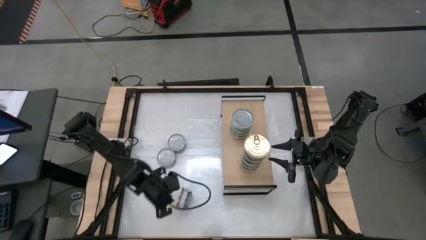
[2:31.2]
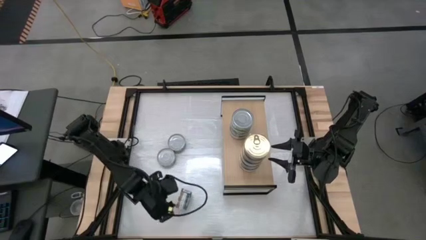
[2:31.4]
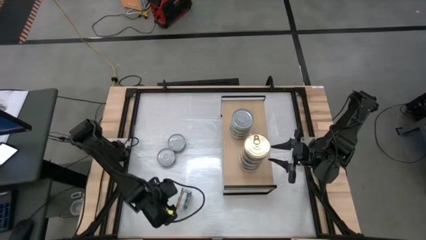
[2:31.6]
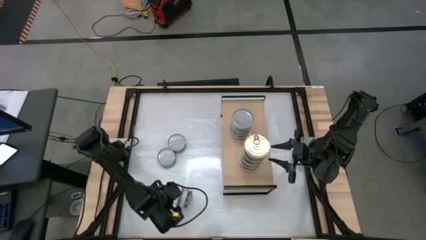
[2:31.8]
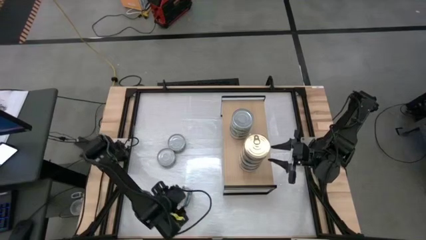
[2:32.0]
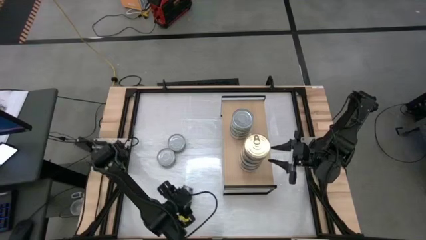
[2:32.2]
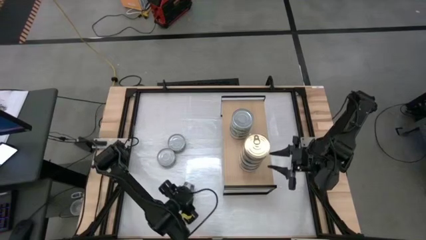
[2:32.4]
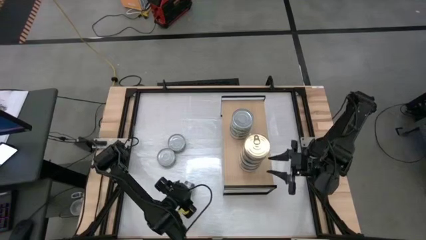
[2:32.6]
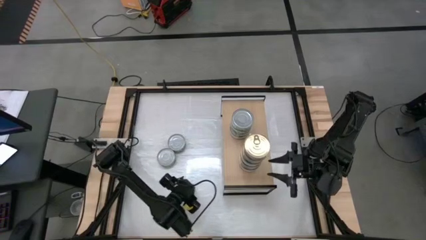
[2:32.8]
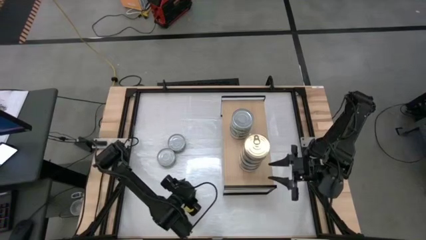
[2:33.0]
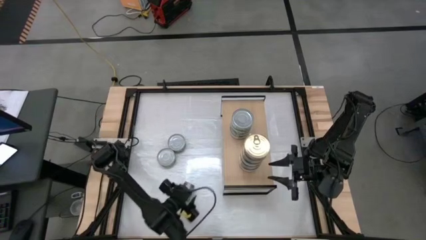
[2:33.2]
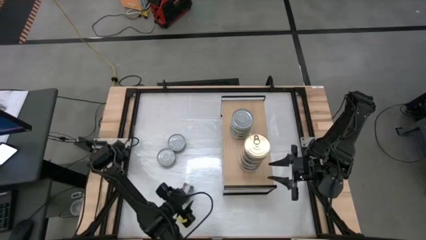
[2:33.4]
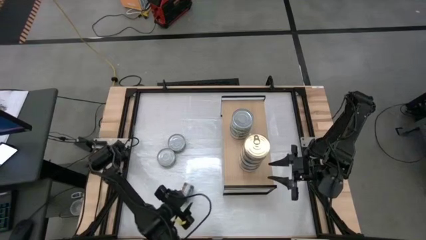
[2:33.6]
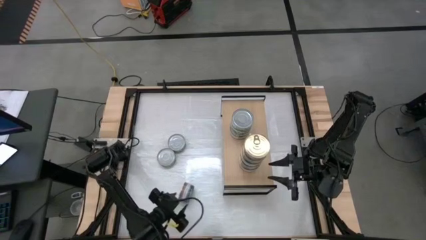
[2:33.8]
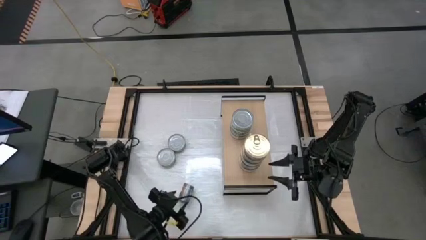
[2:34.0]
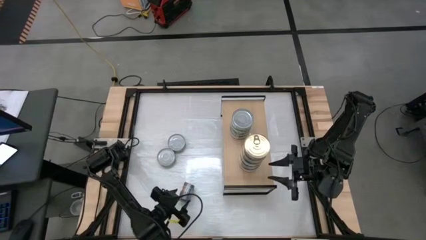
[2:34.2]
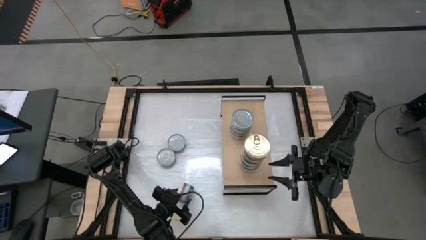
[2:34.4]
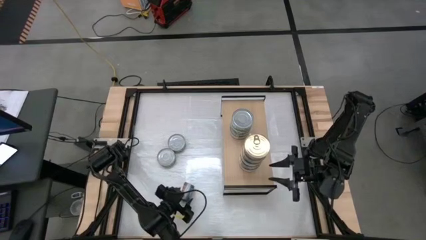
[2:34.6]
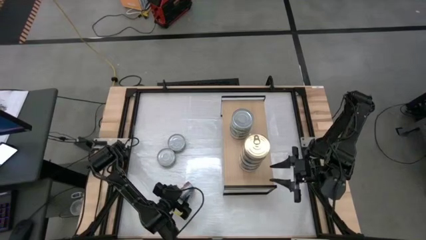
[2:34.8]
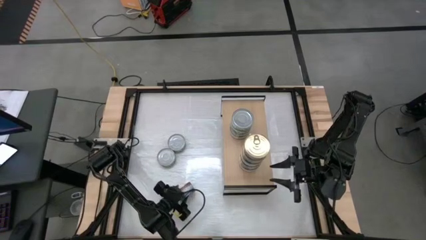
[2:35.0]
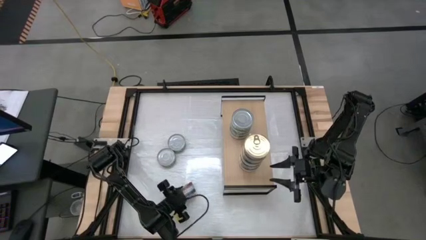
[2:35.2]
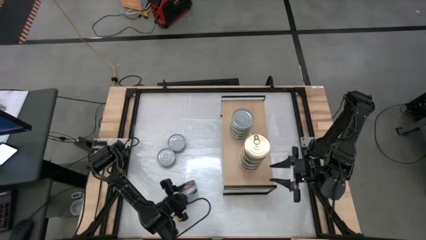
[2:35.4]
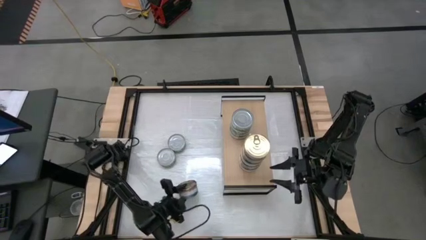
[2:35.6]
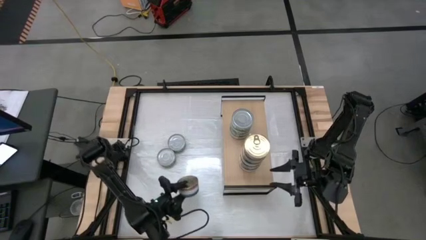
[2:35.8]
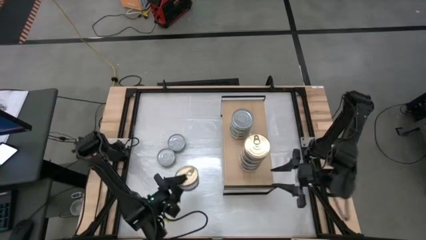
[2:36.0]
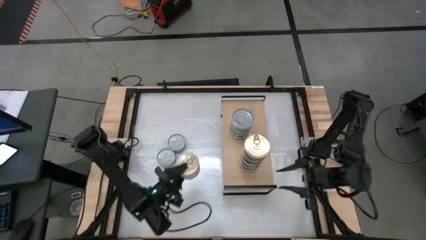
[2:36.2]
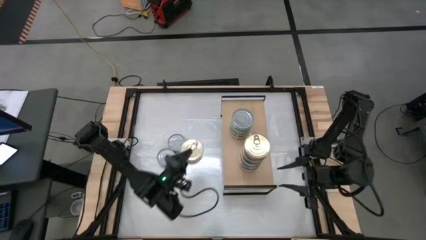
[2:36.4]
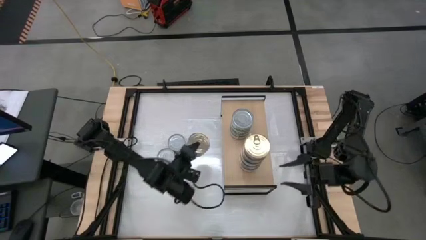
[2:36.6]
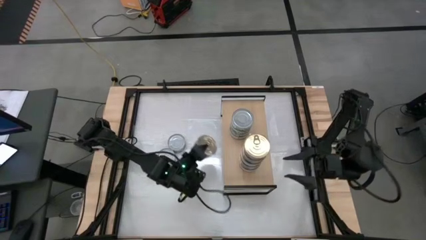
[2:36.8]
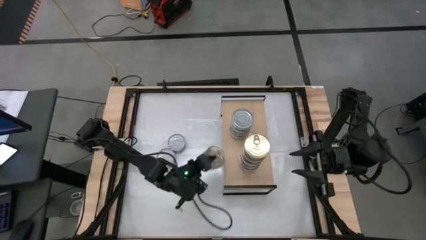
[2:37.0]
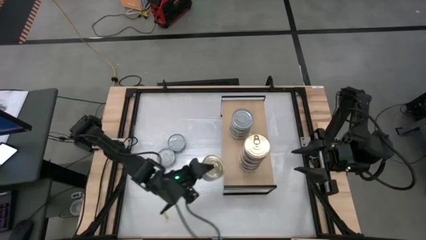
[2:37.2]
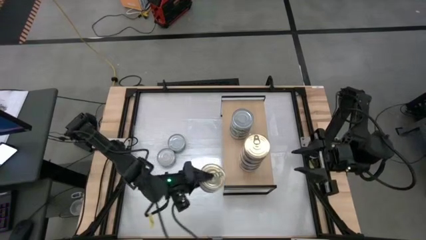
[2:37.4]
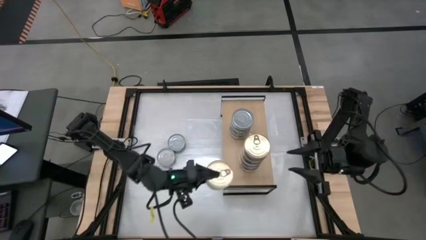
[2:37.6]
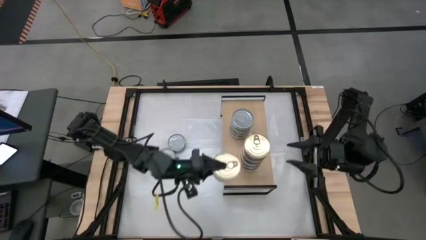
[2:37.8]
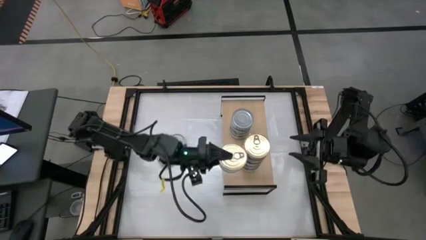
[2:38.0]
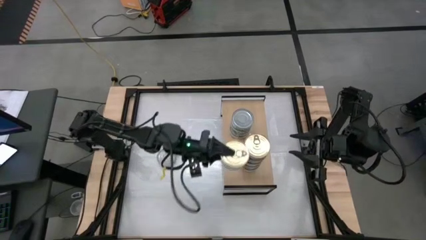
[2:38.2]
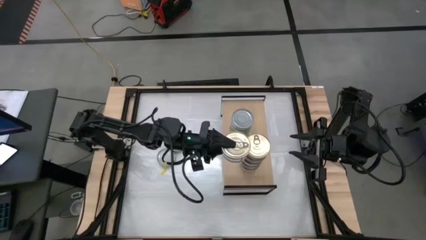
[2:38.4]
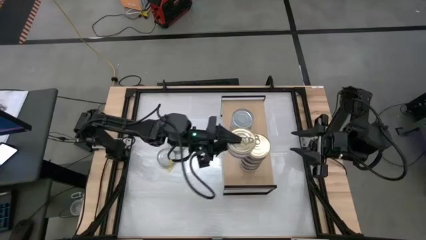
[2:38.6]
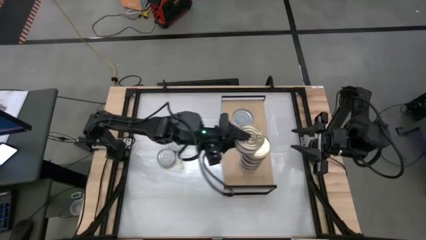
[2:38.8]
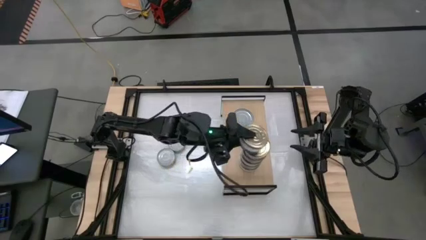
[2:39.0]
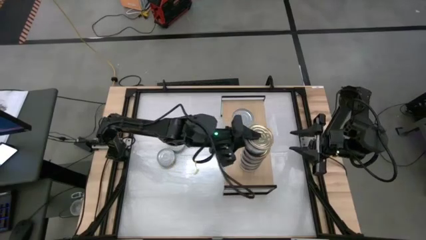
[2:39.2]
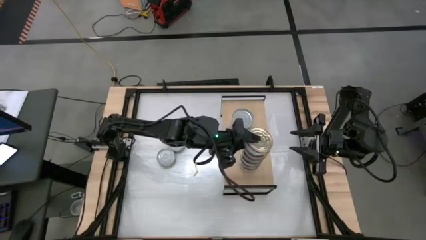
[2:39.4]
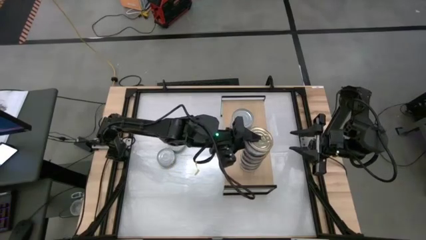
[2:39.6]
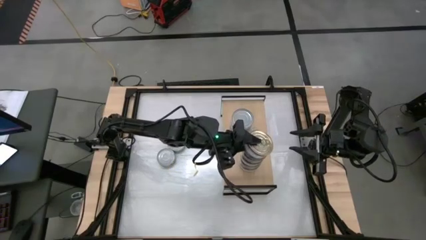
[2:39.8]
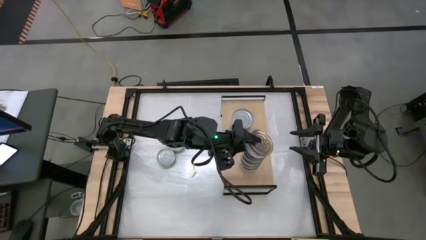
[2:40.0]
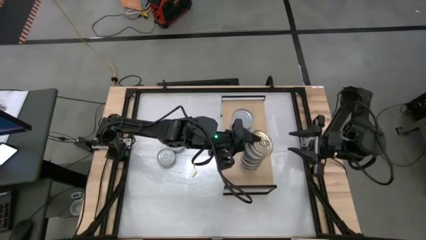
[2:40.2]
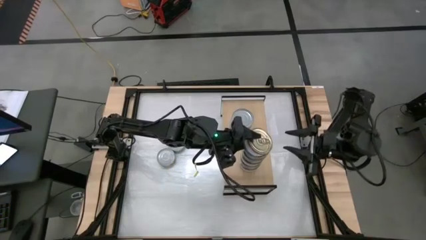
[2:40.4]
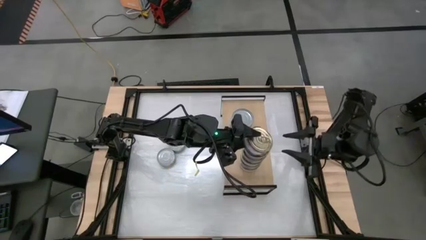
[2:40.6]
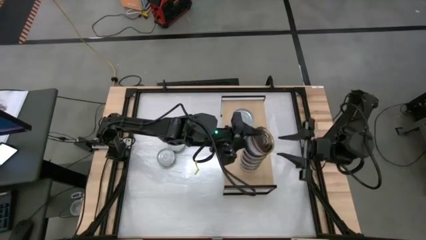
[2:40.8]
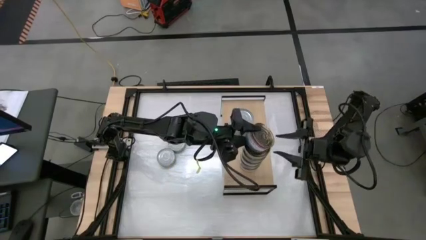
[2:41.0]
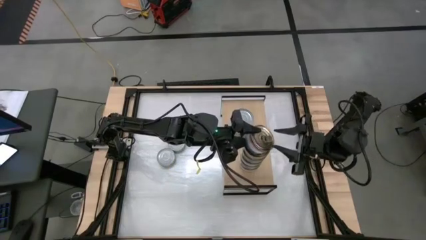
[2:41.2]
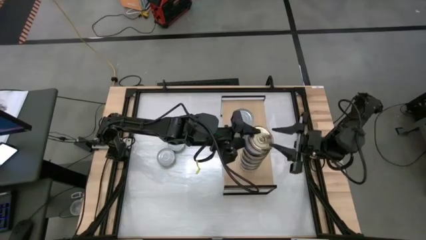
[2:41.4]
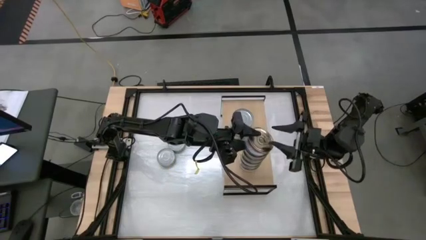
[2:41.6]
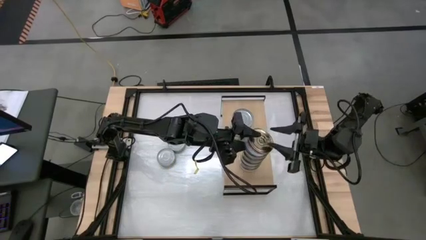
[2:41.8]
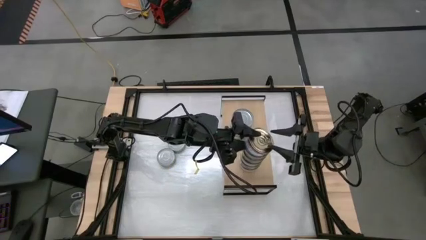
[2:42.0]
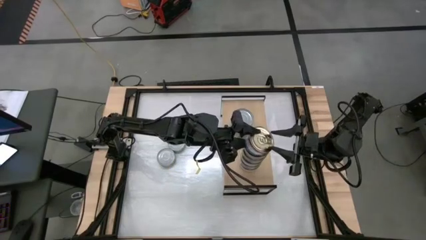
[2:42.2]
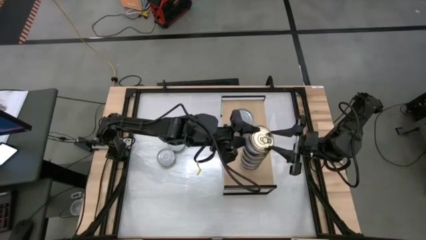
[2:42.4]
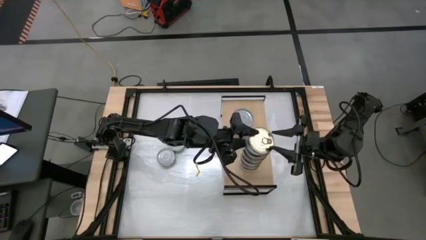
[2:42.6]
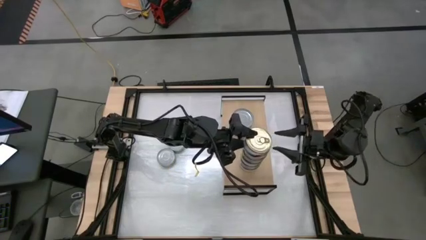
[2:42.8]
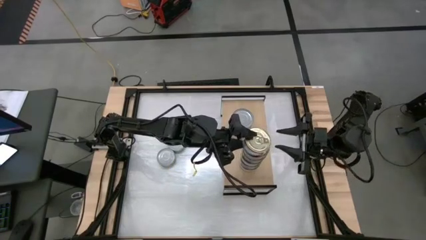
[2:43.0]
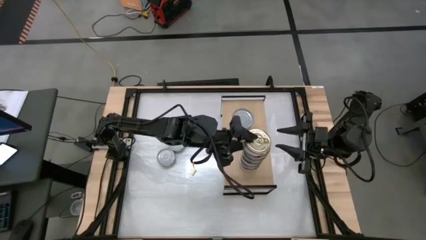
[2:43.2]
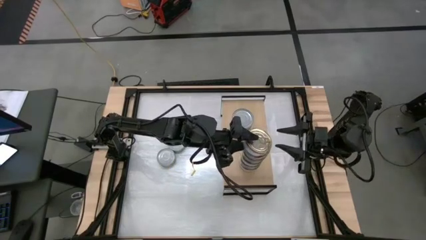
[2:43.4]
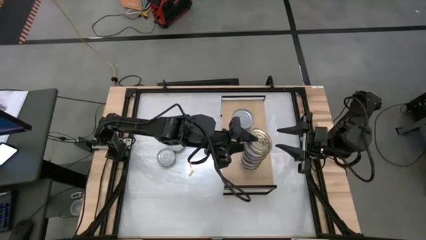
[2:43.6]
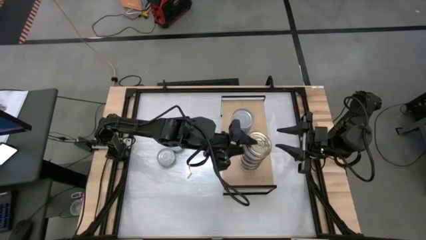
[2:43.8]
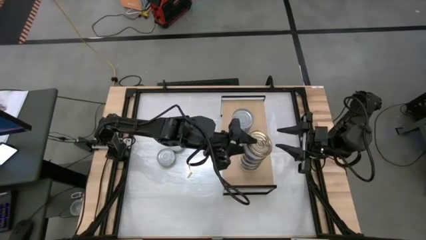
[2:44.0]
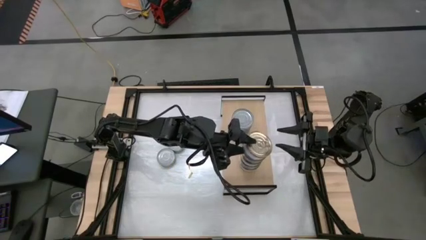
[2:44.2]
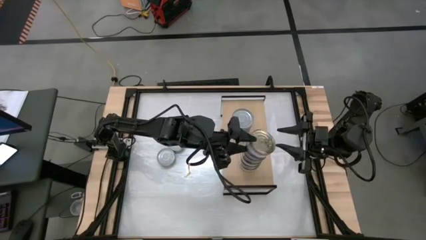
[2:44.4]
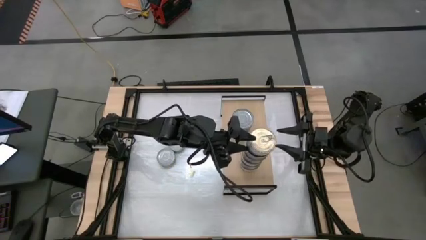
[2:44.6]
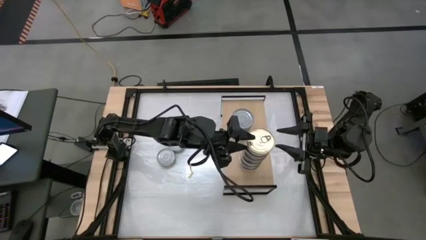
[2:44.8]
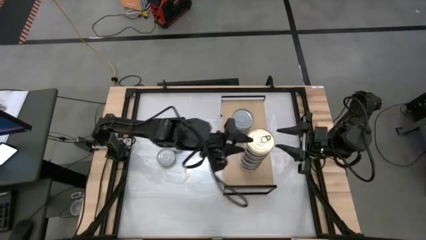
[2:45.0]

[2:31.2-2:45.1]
Task: Stack canned seafood by type on shelf
Stack the blue tuna can on top of the blue tuna can
